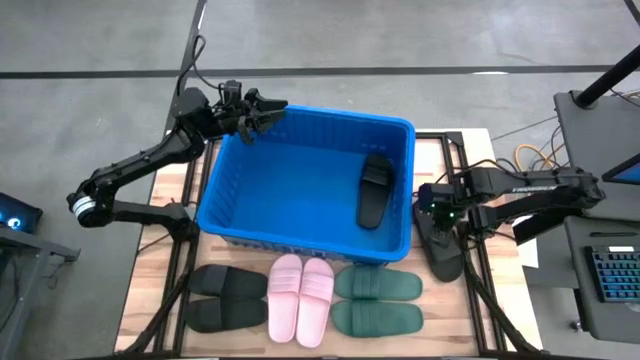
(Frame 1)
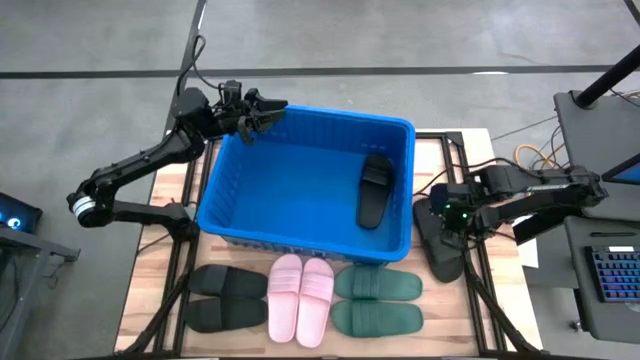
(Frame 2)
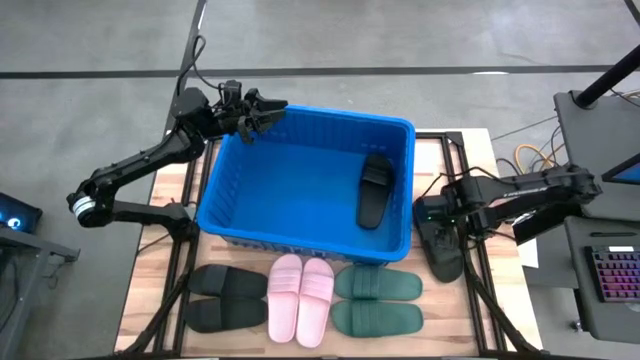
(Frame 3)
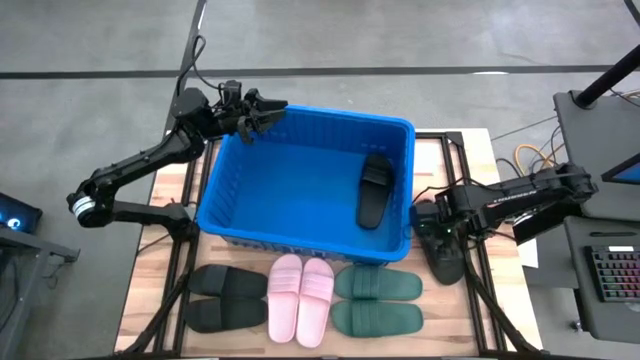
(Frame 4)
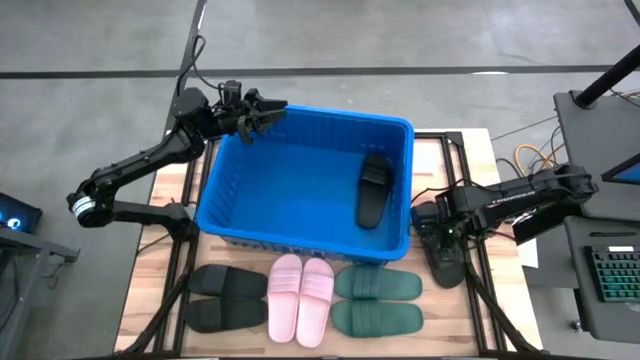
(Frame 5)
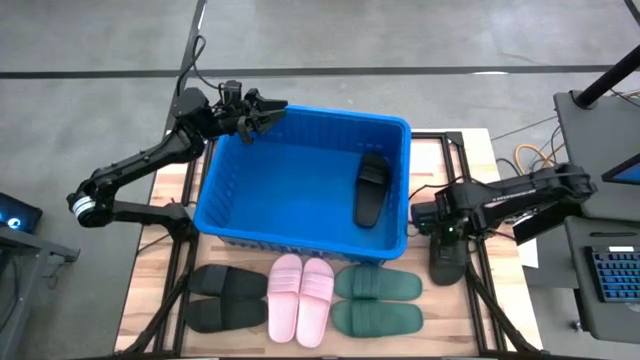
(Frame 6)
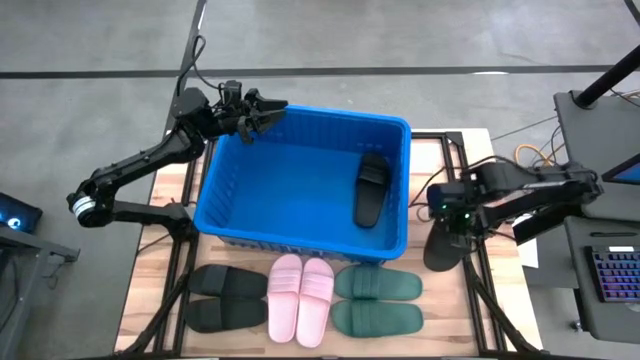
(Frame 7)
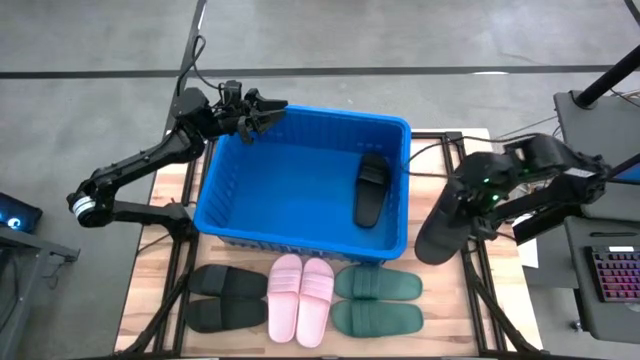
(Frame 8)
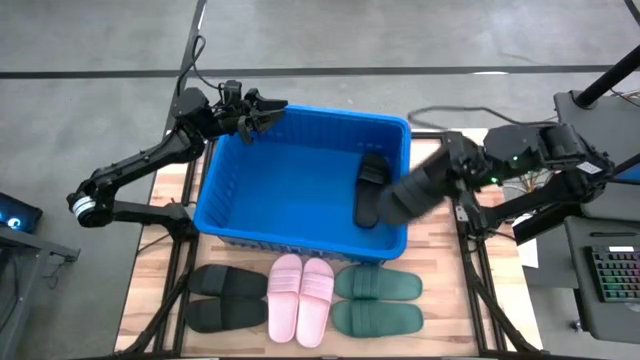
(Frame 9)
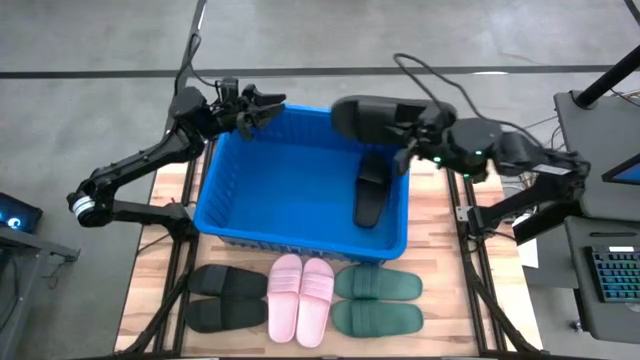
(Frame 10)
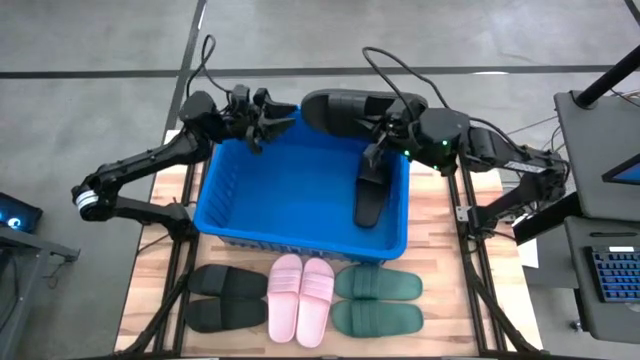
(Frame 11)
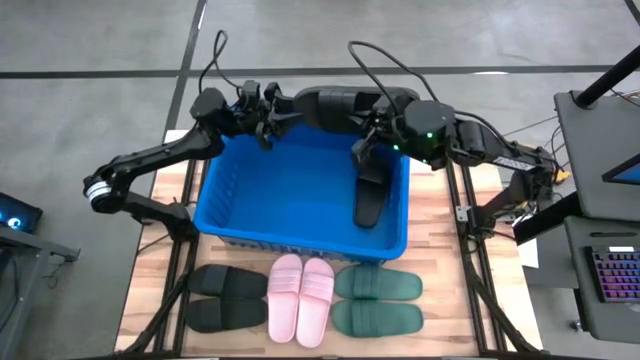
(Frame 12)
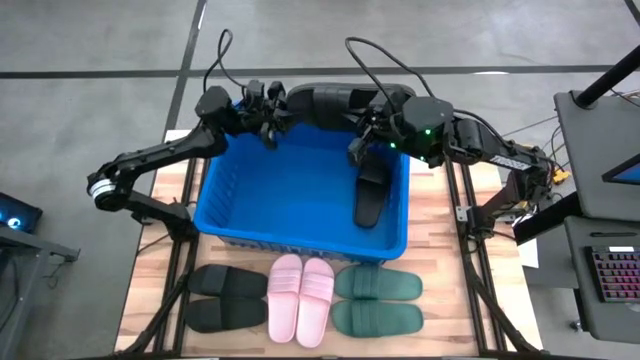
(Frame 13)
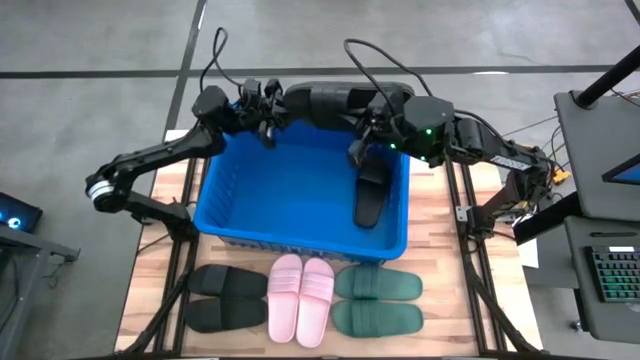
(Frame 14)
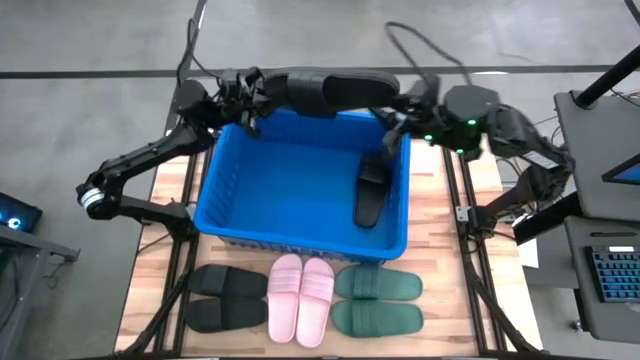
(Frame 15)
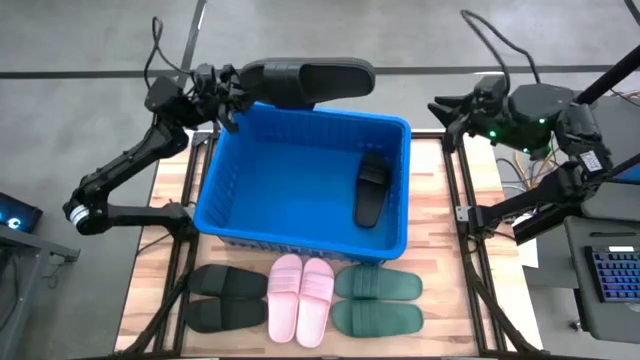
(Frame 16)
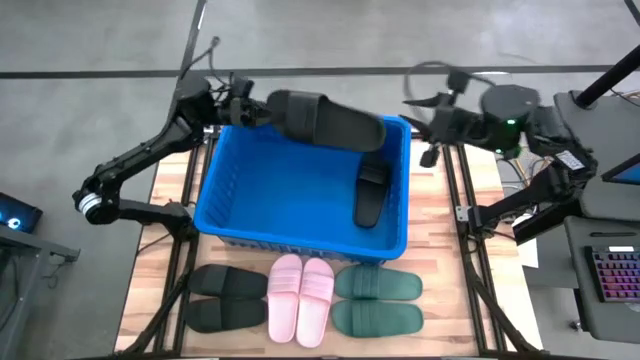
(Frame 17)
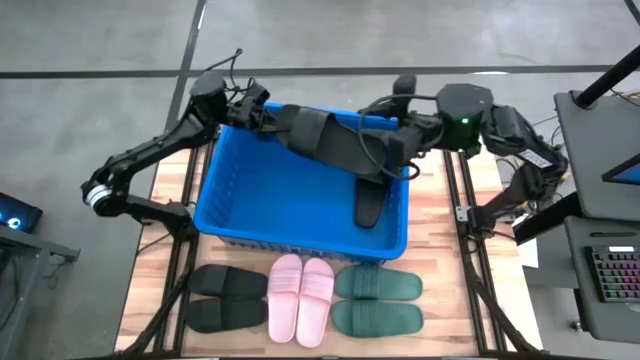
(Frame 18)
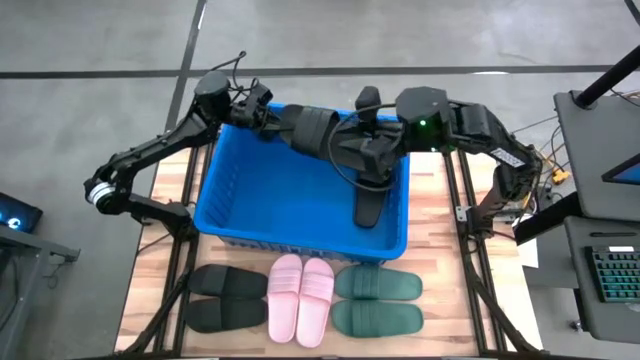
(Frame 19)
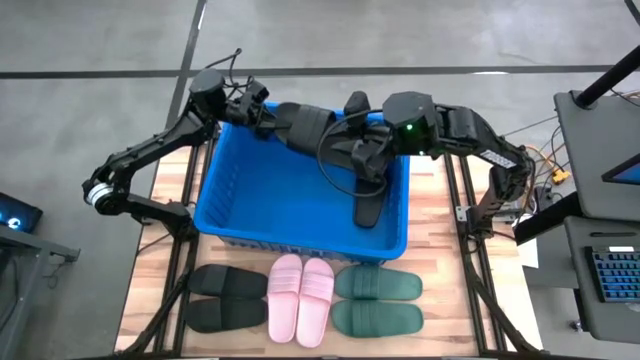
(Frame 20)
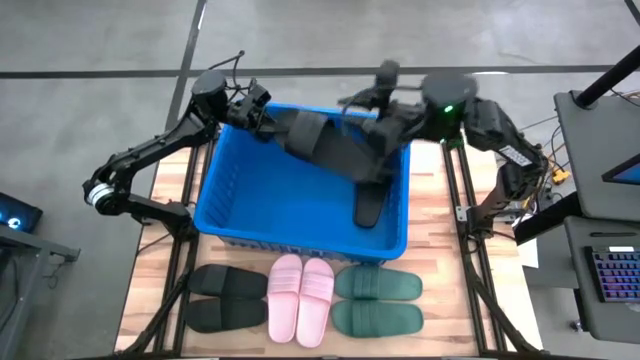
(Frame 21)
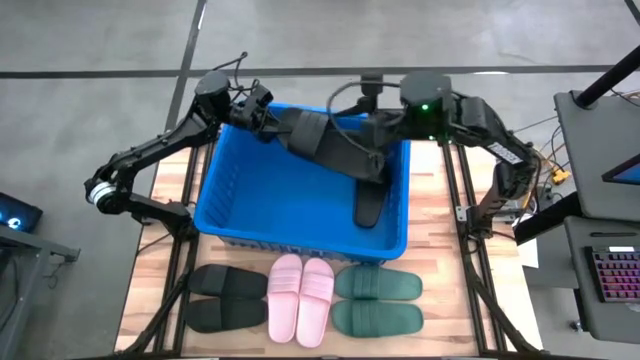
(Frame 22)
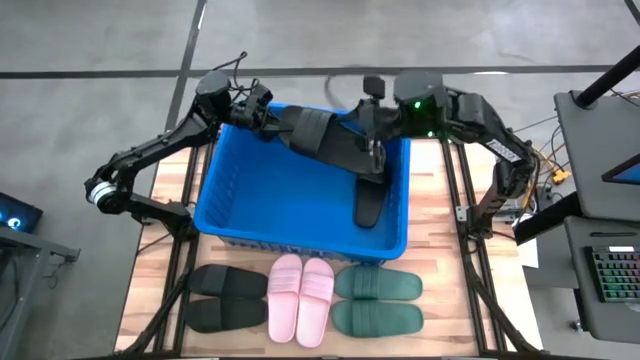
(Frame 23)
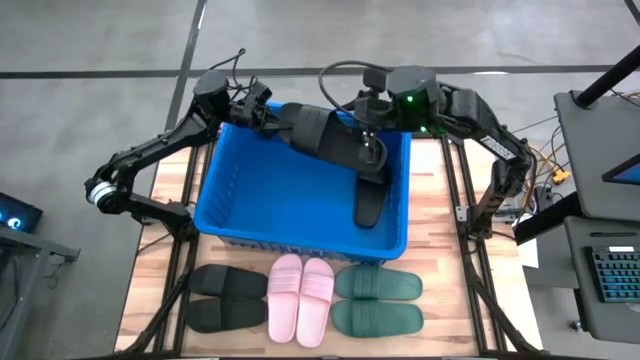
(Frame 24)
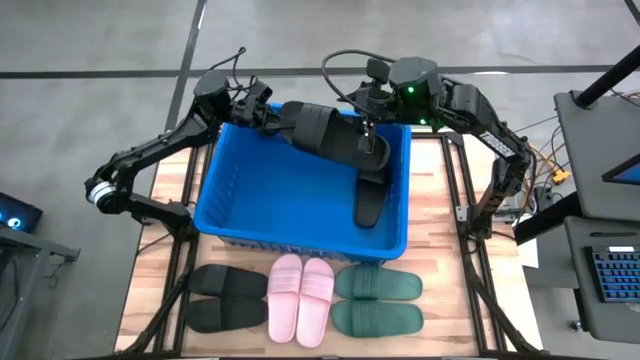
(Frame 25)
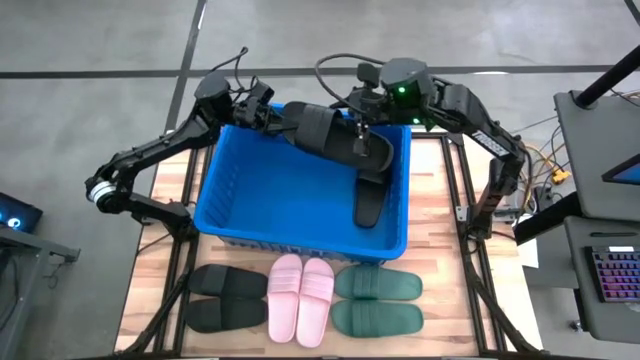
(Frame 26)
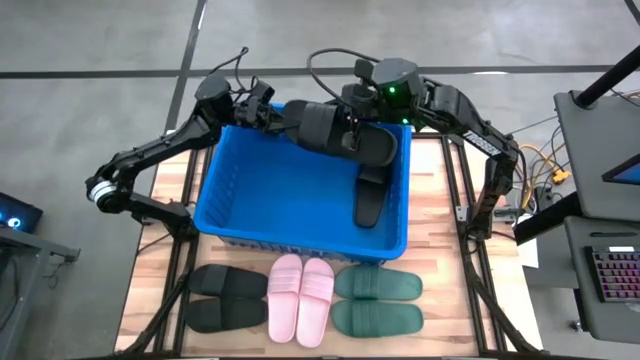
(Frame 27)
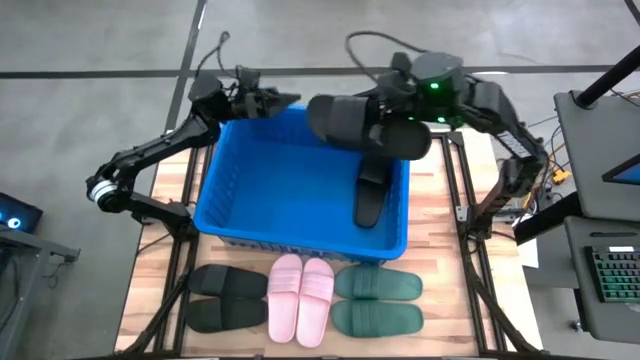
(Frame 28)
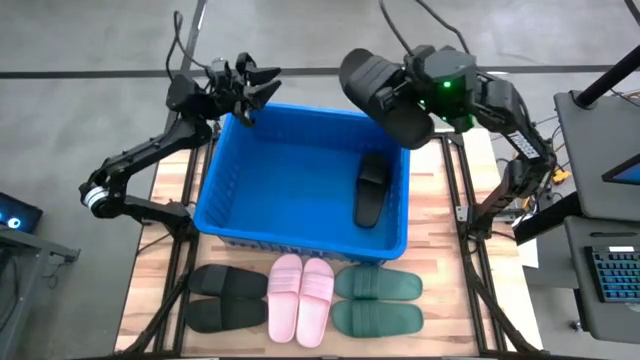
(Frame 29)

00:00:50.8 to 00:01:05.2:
Task: Pick and place slides into bin
Put the black slide into the blue bin

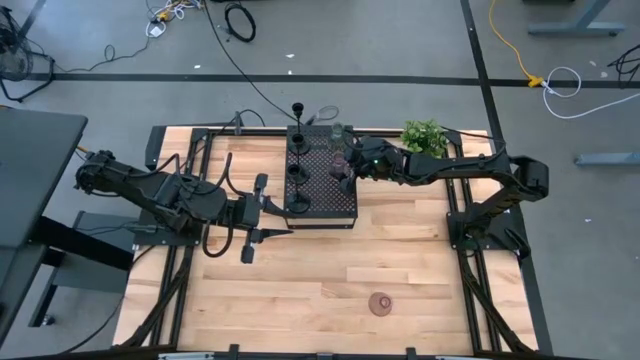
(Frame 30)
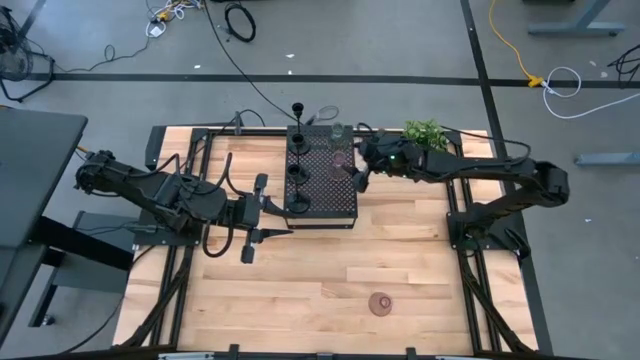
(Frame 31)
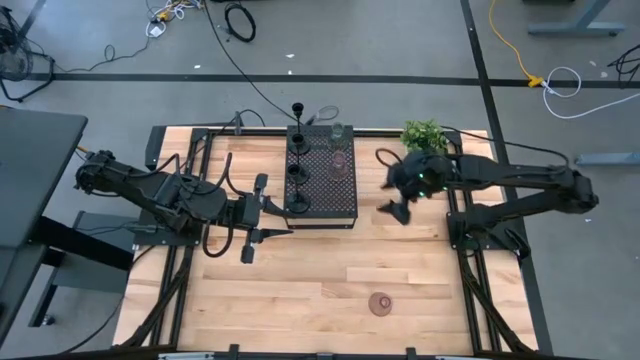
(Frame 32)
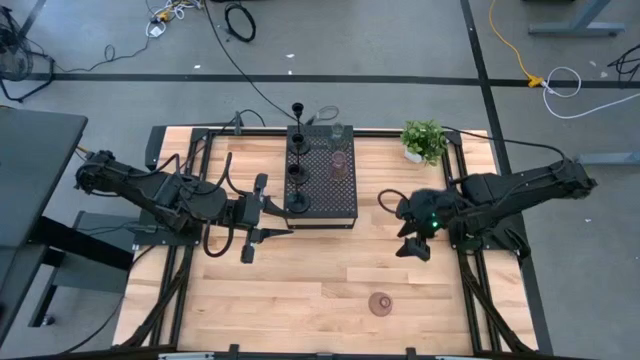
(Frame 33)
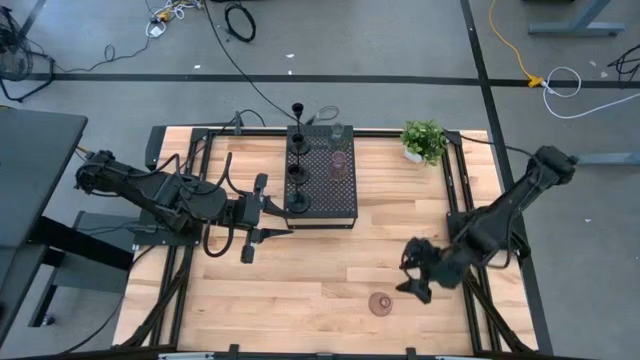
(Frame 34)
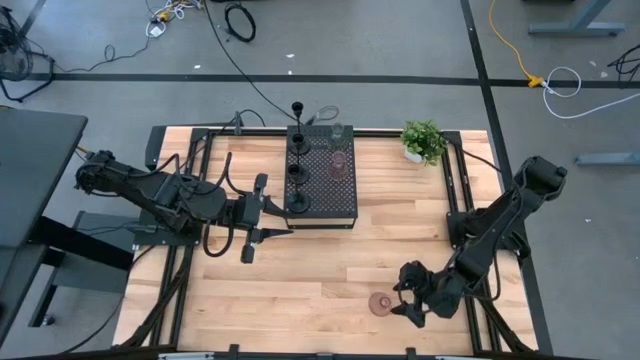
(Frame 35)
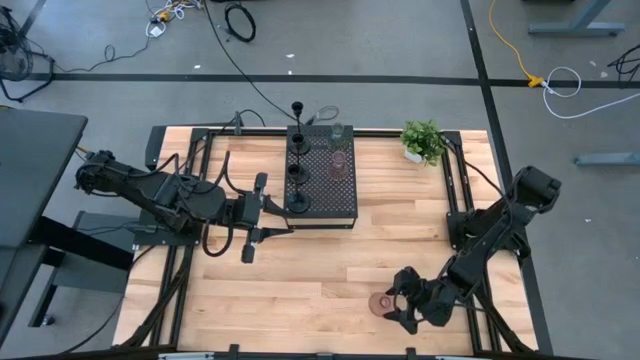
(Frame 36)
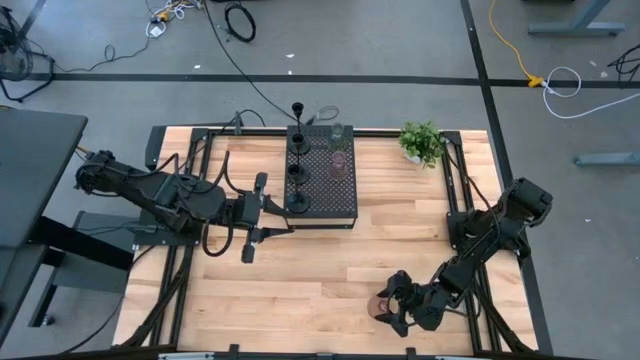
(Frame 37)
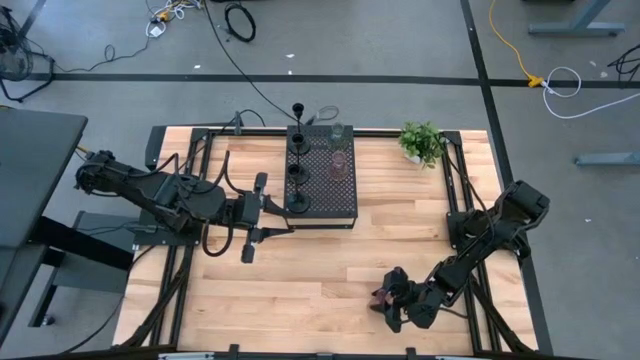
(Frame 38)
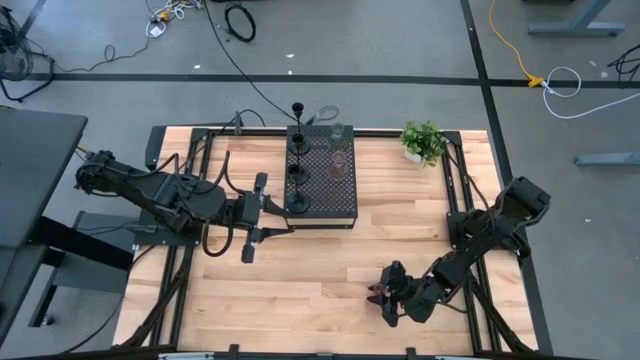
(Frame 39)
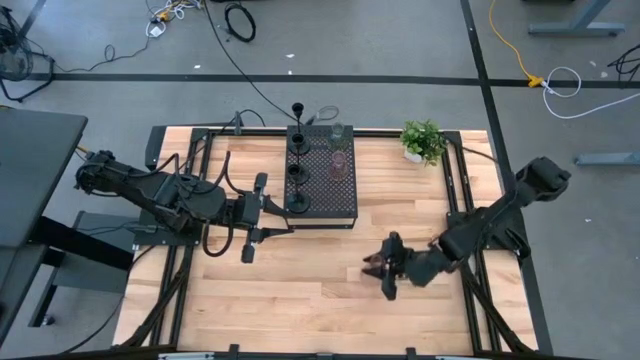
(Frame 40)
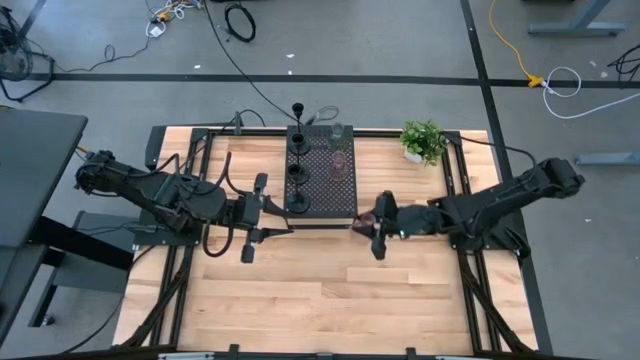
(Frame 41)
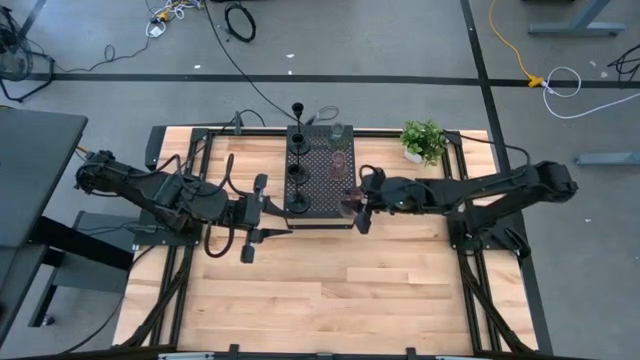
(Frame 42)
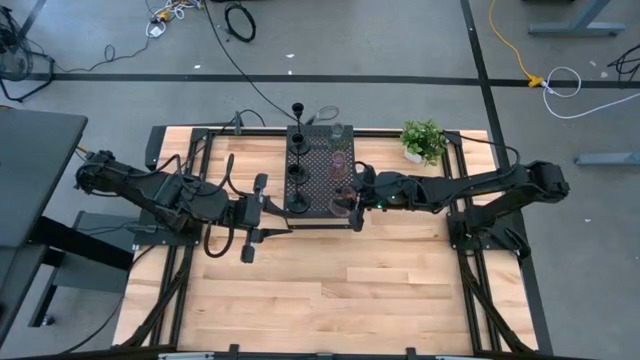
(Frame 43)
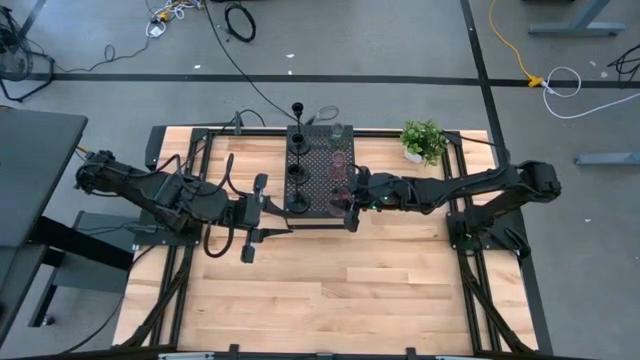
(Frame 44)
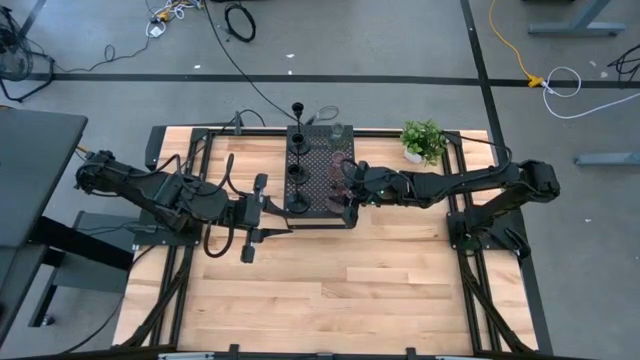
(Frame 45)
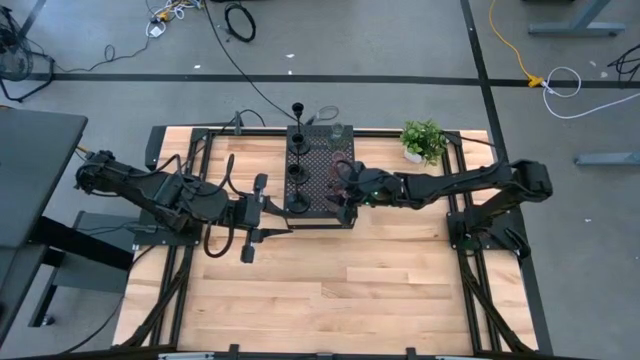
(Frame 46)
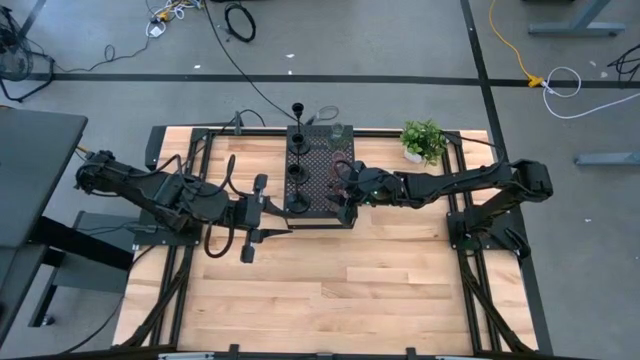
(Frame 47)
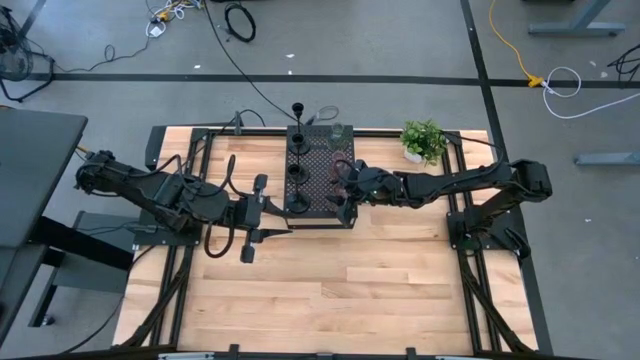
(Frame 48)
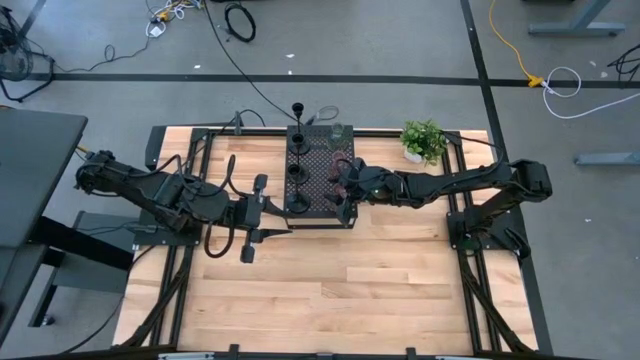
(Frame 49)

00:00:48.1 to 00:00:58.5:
Task: Pick & Place candle stick holders
Put the pink candle holder on the shelf
